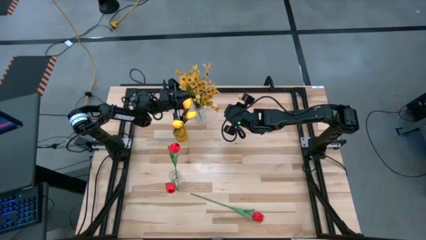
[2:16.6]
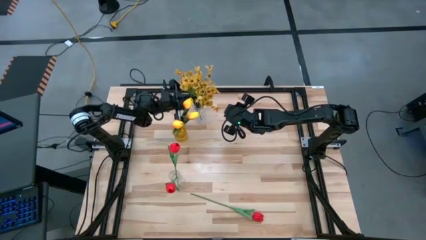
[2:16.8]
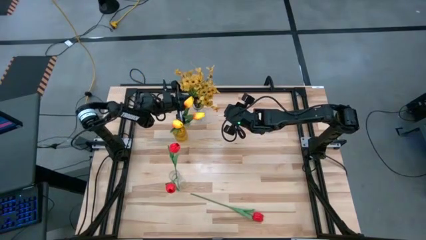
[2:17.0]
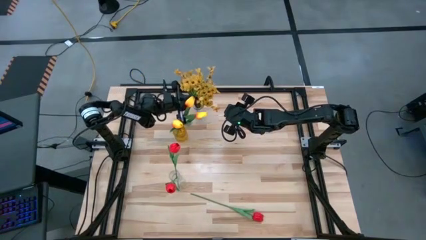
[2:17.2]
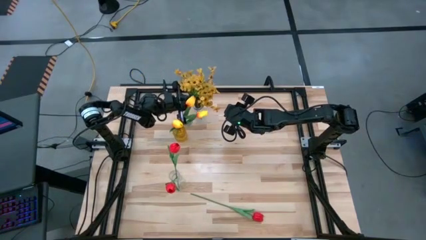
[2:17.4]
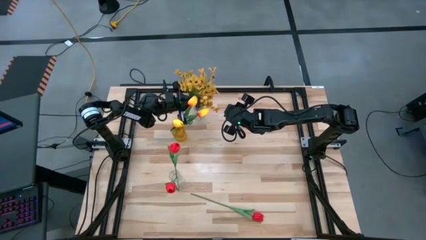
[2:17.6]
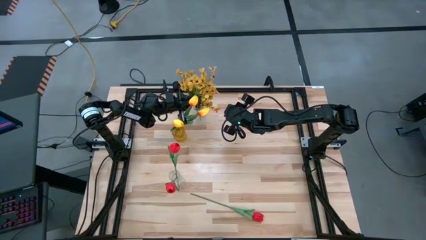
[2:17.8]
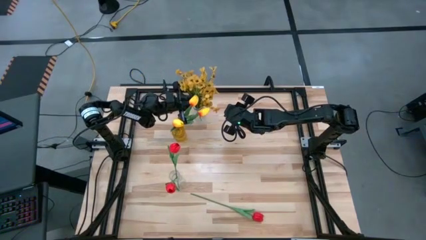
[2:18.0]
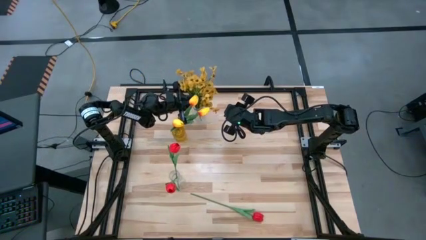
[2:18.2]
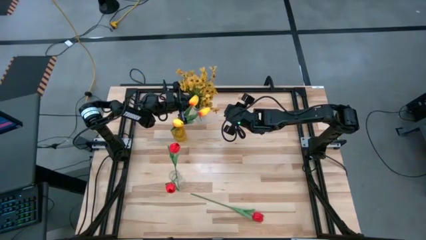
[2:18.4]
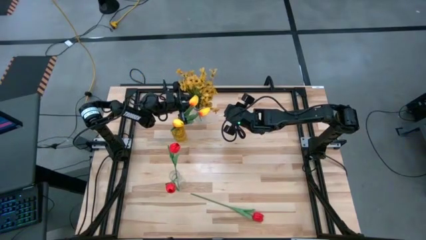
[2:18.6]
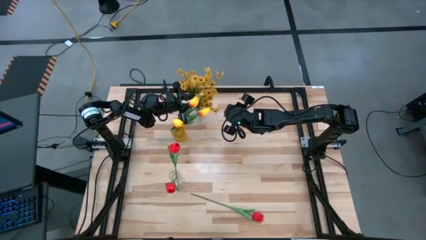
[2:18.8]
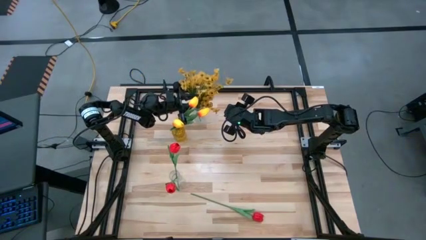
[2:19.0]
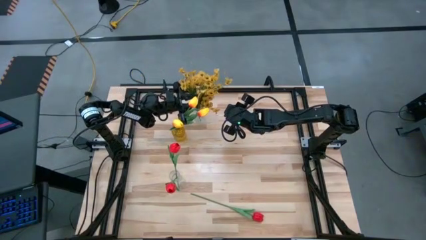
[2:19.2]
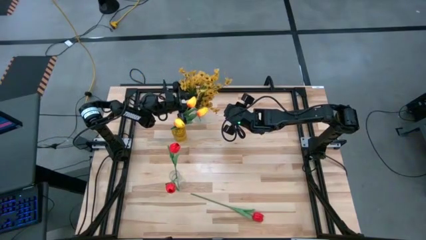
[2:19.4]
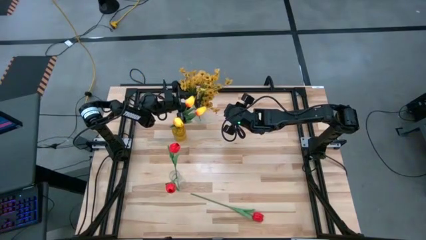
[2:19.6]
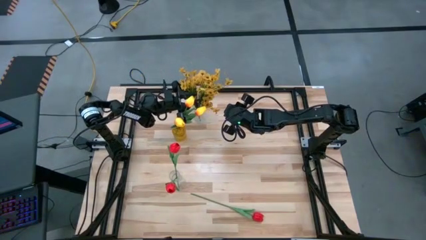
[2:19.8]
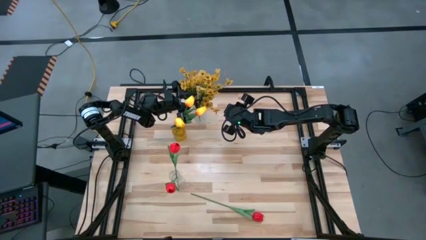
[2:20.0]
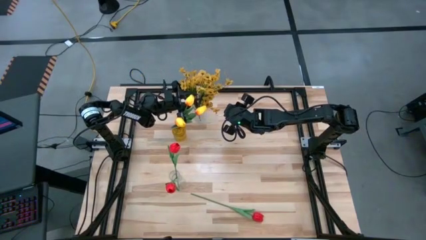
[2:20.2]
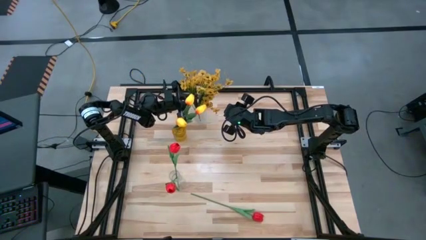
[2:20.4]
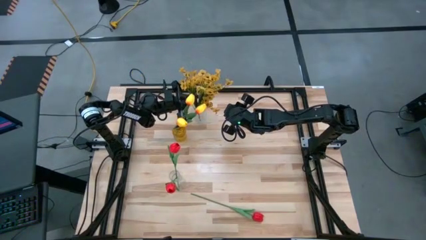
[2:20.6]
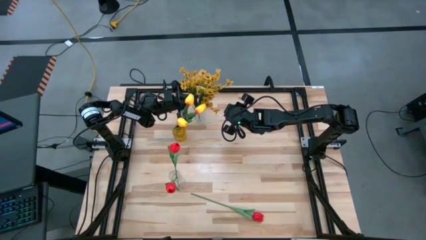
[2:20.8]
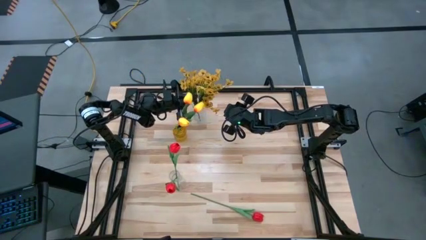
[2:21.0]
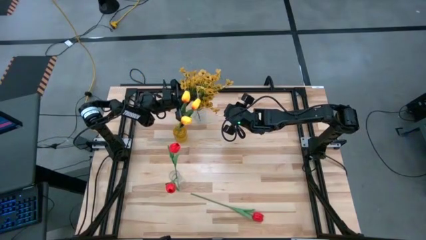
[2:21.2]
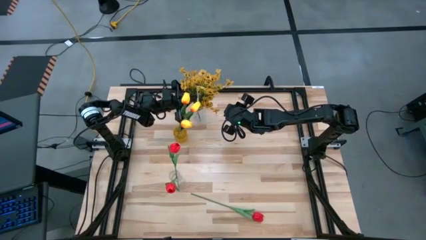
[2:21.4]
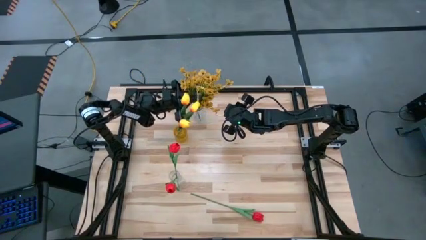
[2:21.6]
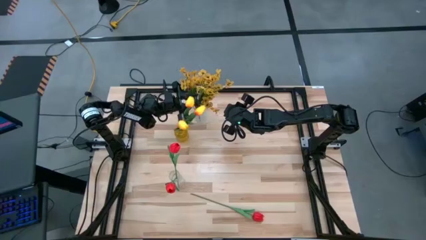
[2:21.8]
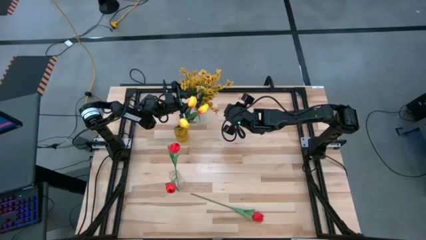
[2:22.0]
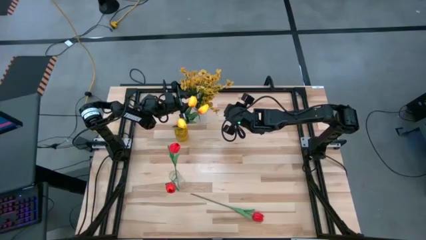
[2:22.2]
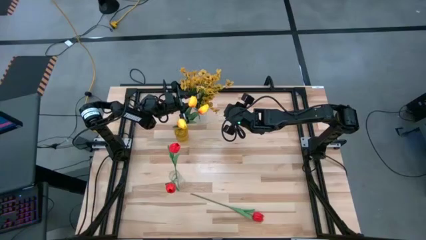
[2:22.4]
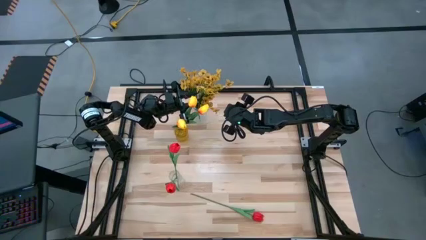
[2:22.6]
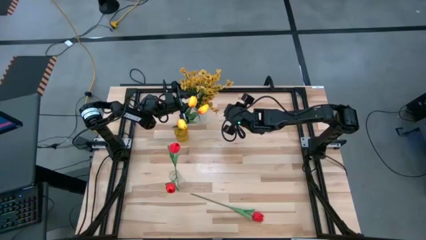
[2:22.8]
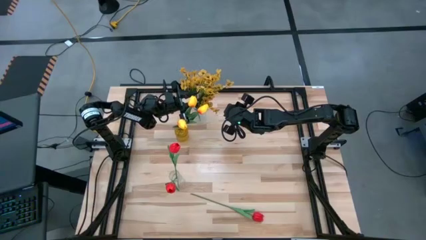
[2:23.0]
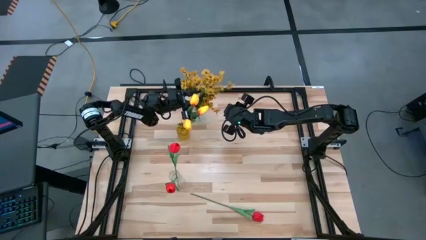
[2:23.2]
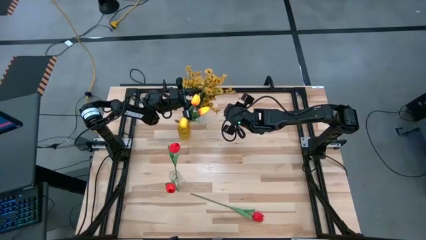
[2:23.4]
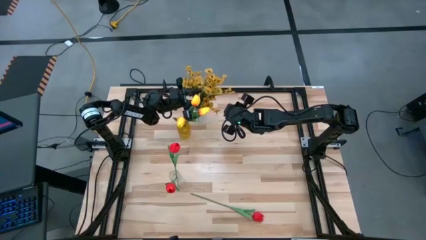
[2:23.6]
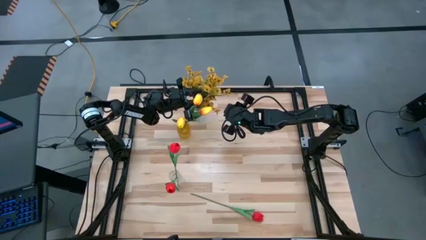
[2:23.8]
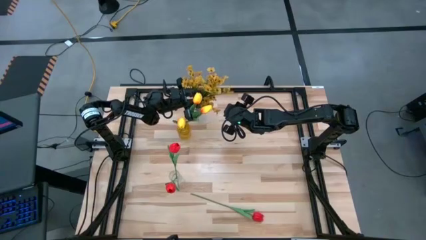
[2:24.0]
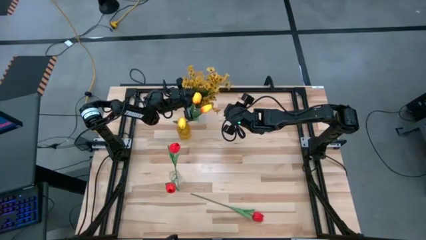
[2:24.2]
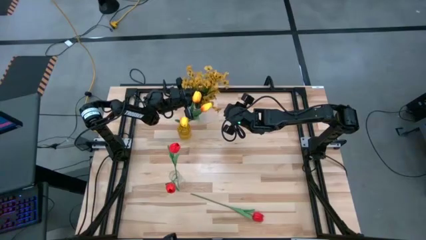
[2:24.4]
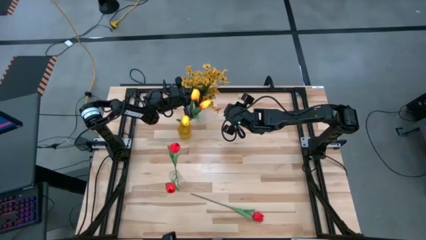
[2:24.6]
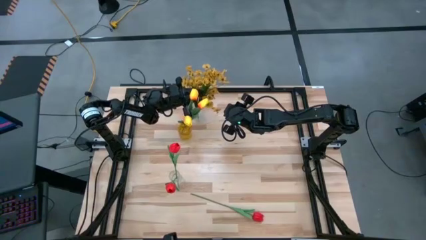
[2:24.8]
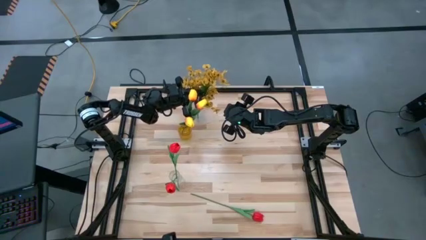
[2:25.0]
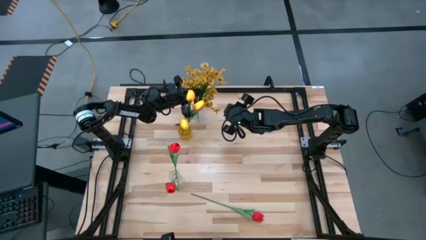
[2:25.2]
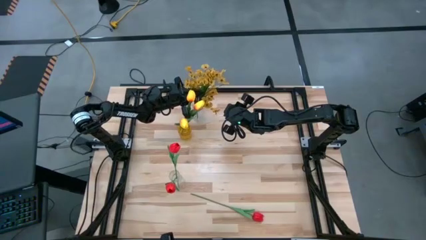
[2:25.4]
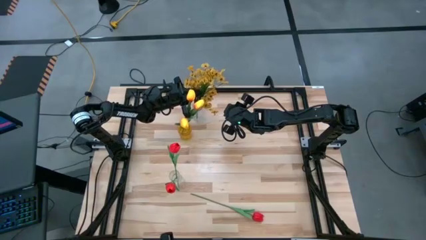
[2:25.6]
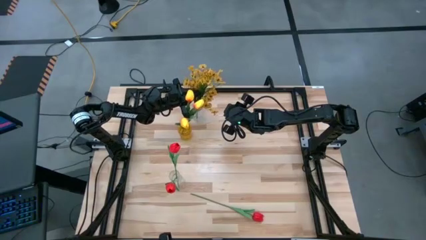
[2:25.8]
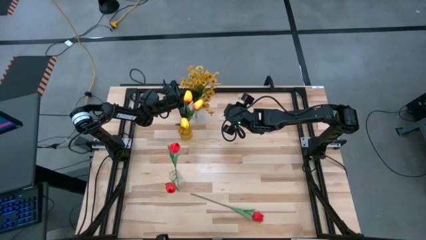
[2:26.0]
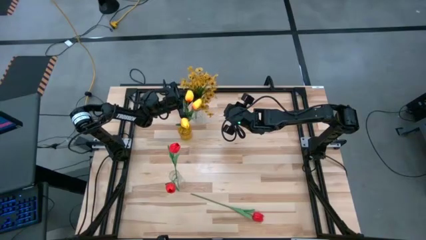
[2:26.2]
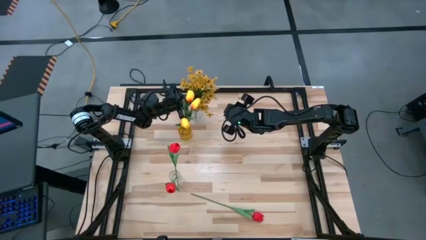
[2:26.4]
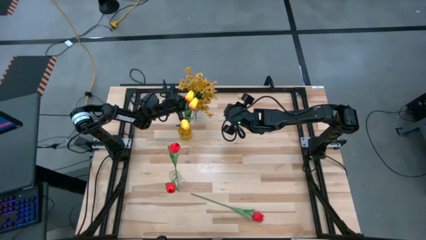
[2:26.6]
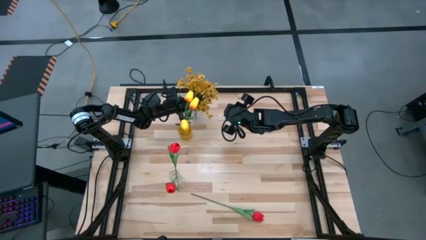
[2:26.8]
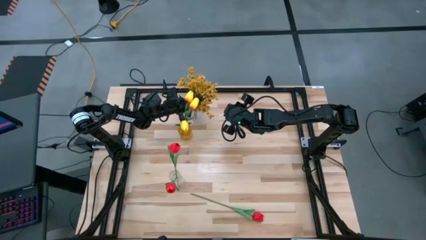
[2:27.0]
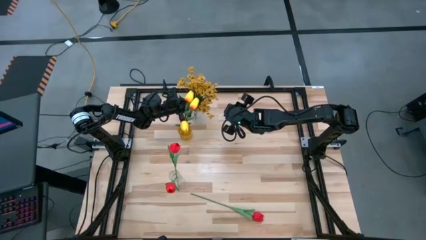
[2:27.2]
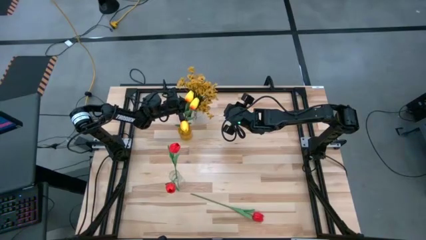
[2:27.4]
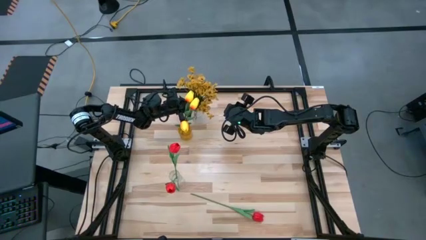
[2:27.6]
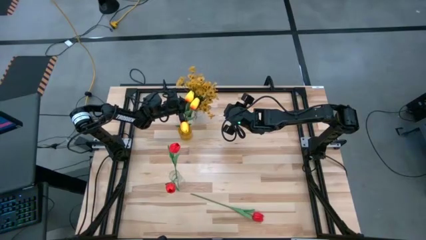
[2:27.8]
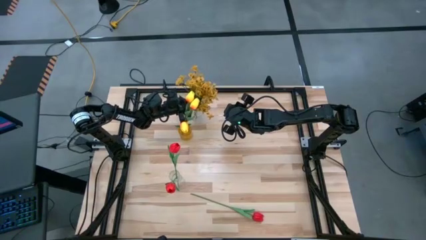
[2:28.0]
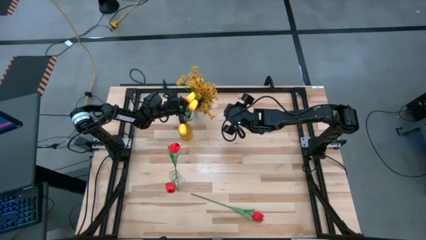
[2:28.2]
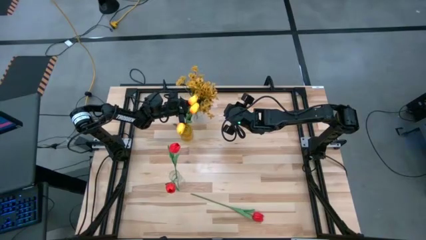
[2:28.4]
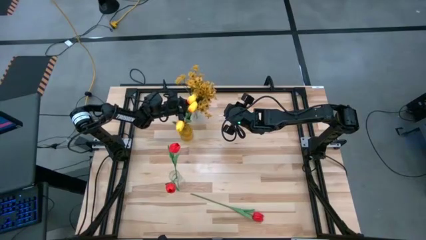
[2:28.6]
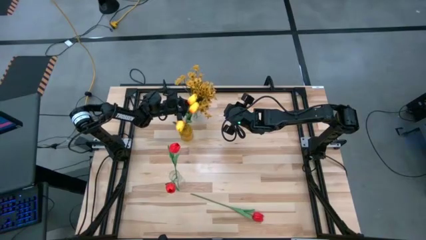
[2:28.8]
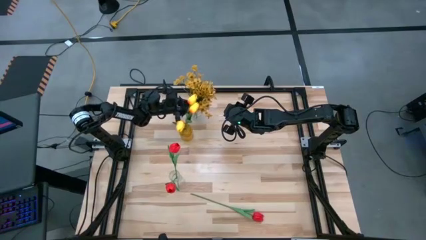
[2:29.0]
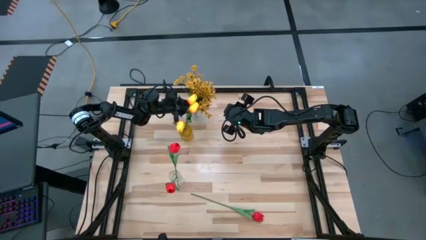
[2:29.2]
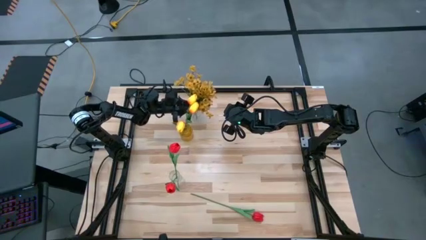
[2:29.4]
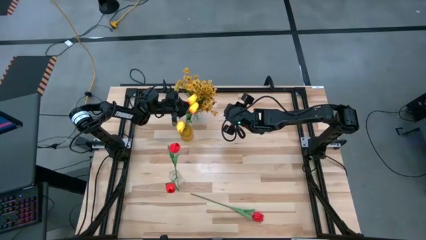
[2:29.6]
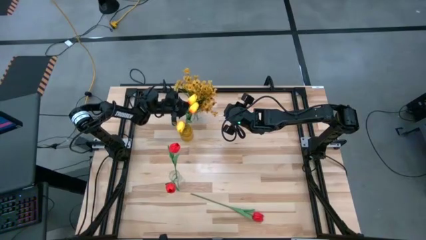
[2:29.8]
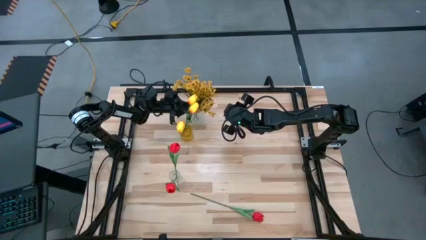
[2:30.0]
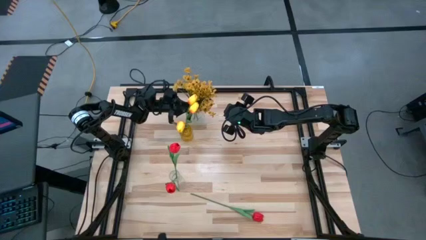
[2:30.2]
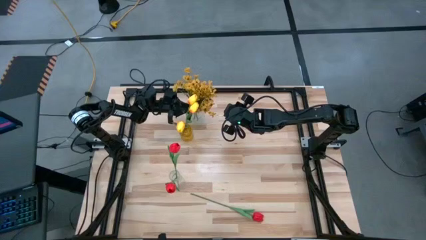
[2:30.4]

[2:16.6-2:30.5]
Task: Sort flowers into vase by color
Put the yellow flowers into the top transparent vase

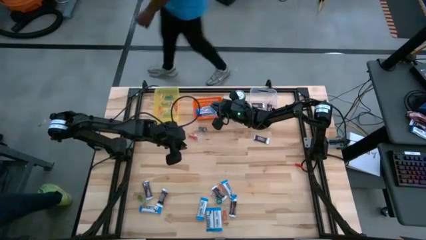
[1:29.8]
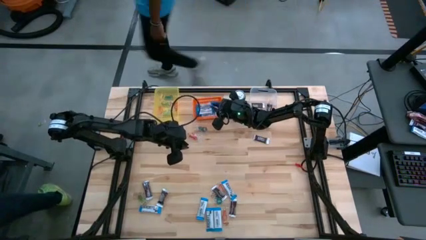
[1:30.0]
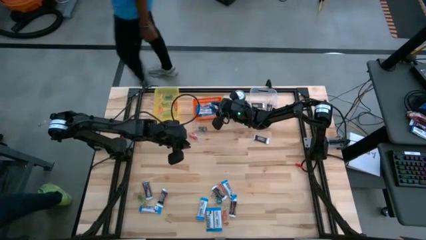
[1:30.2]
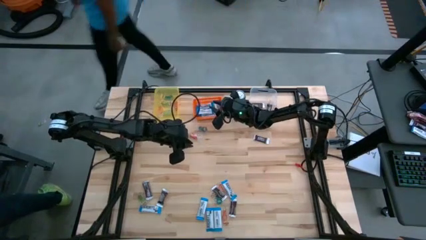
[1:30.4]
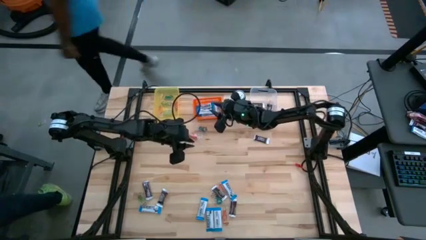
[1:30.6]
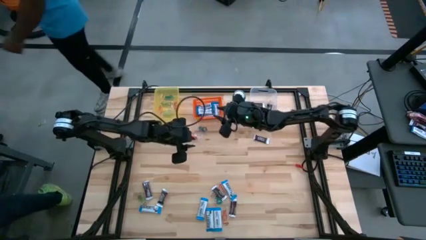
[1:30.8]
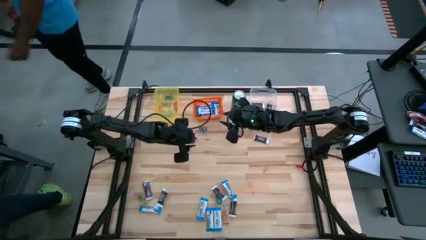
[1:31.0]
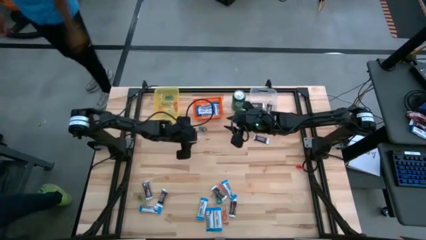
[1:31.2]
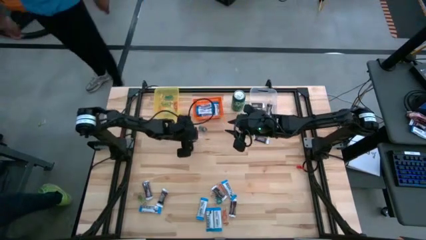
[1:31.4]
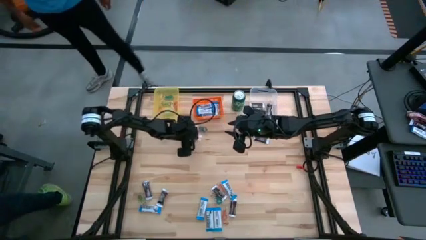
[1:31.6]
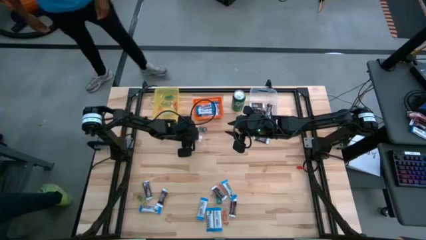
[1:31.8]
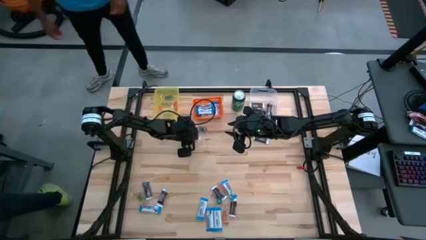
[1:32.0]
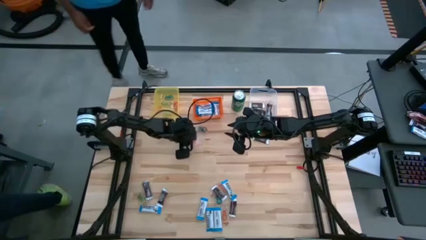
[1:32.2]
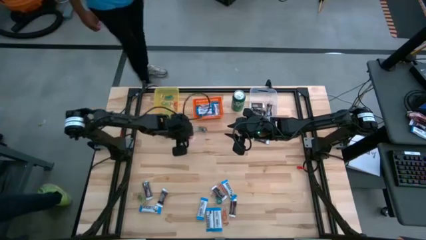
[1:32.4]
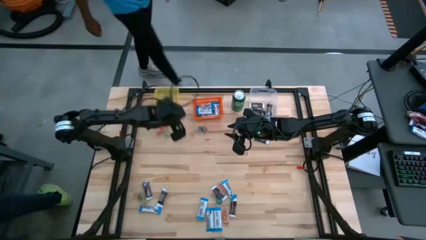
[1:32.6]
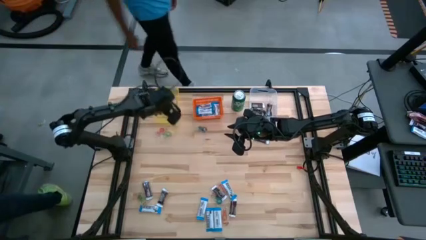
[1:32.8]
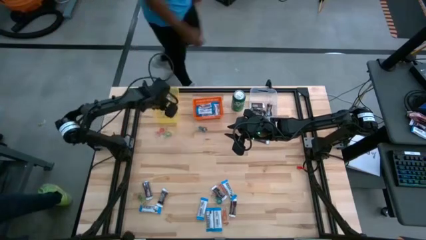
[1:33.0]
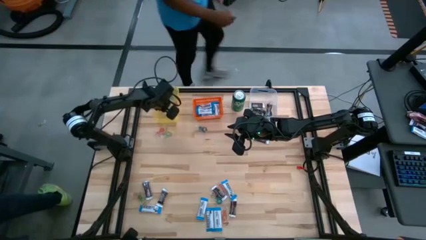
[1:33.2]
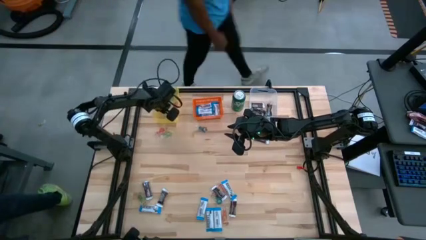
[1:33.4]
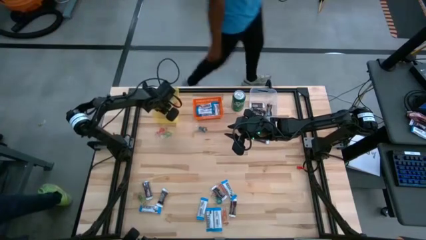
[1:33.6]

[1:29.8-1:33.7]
Task: Organize candy in baskets
Put the red gummy into the yellow bin
